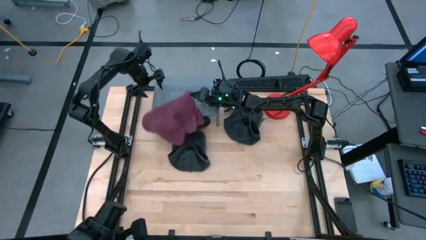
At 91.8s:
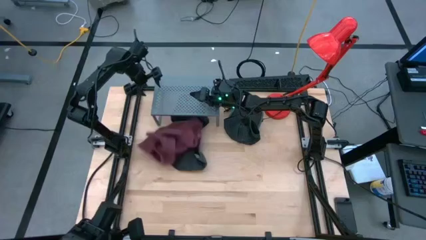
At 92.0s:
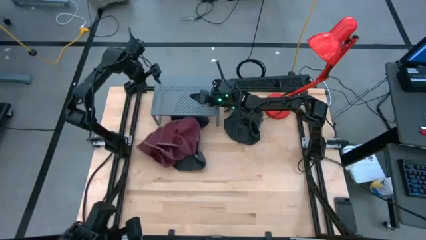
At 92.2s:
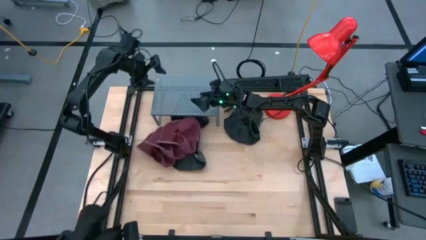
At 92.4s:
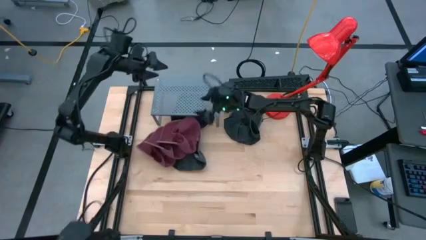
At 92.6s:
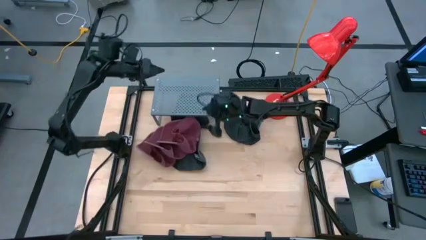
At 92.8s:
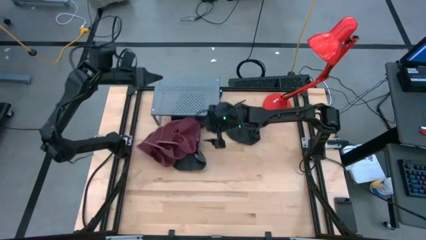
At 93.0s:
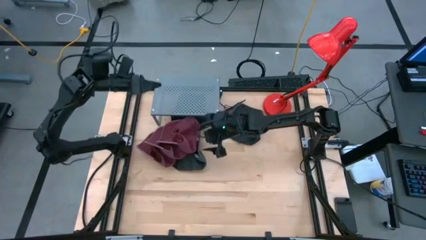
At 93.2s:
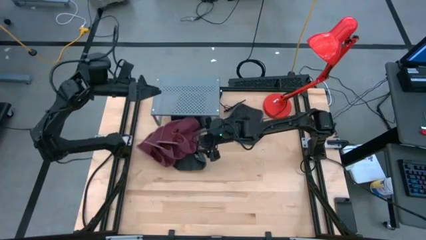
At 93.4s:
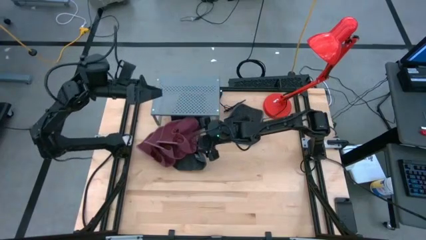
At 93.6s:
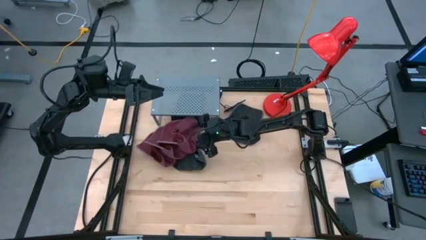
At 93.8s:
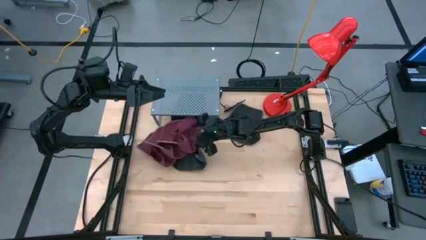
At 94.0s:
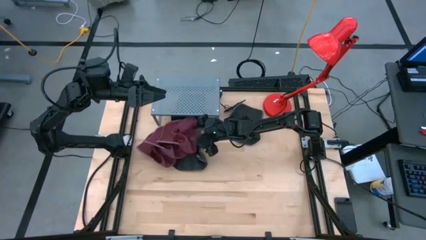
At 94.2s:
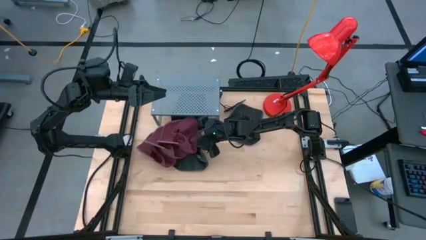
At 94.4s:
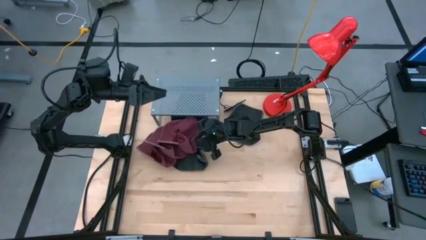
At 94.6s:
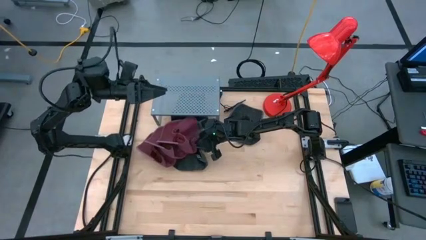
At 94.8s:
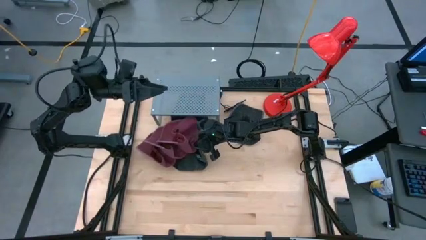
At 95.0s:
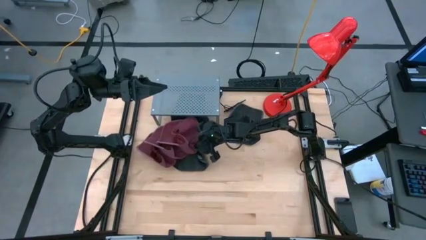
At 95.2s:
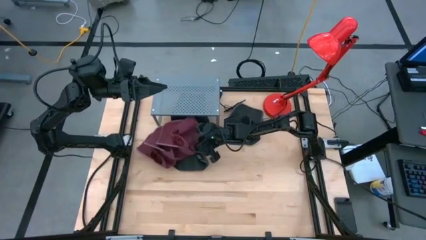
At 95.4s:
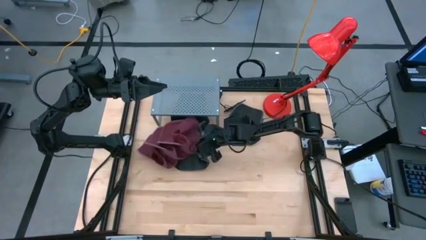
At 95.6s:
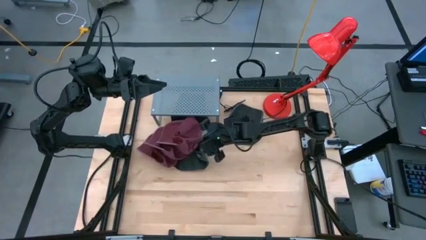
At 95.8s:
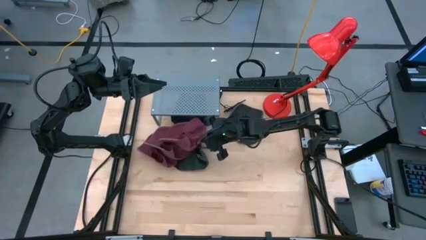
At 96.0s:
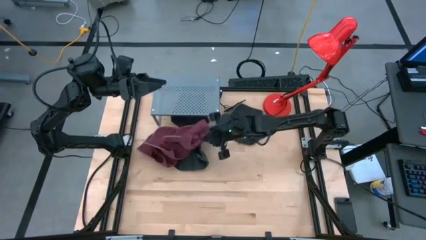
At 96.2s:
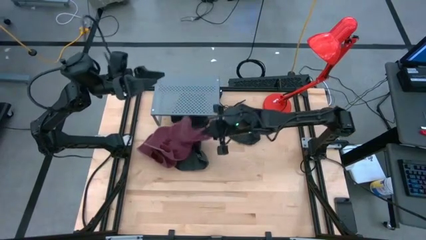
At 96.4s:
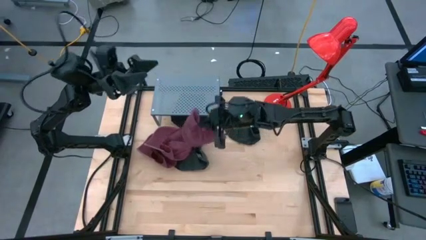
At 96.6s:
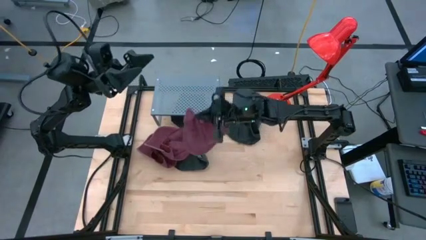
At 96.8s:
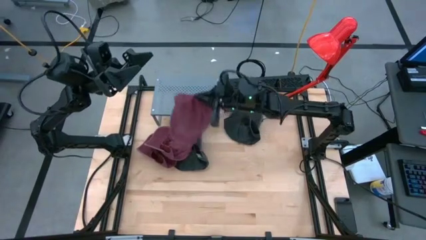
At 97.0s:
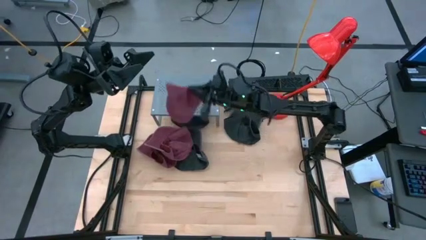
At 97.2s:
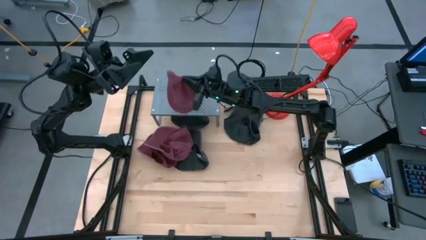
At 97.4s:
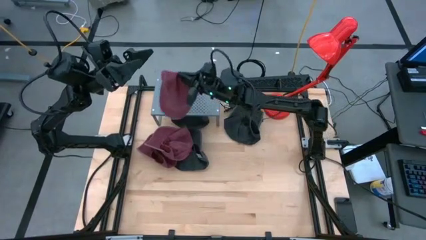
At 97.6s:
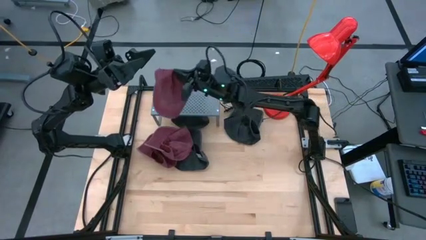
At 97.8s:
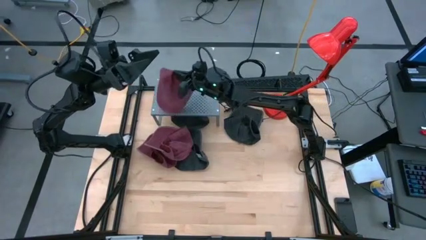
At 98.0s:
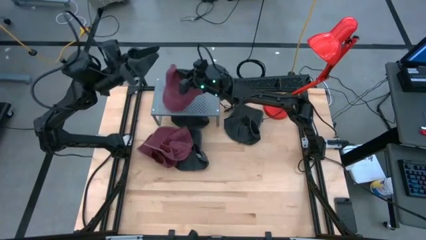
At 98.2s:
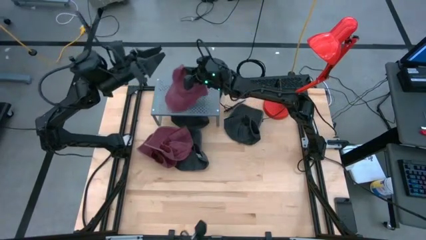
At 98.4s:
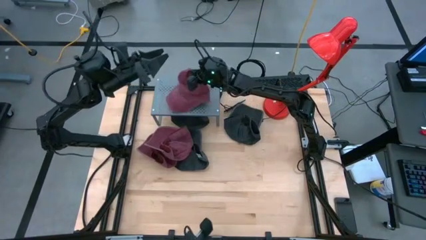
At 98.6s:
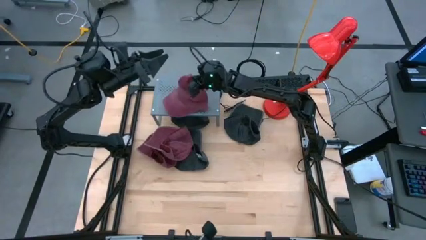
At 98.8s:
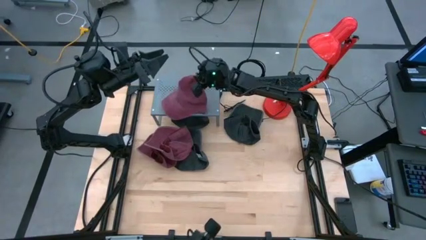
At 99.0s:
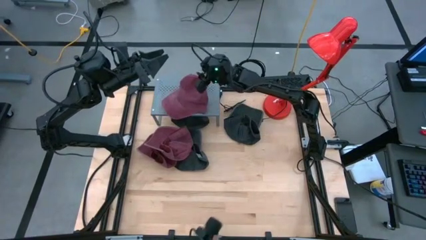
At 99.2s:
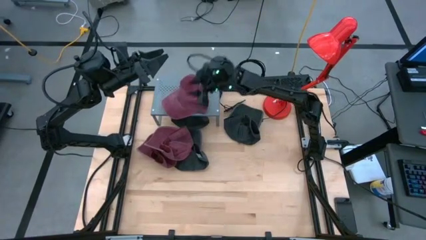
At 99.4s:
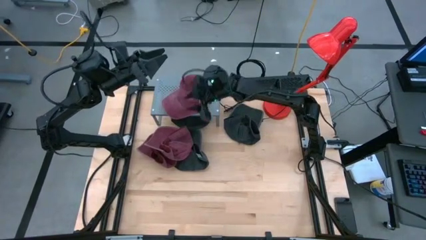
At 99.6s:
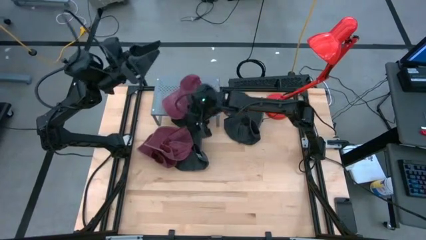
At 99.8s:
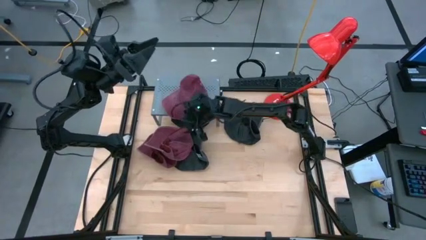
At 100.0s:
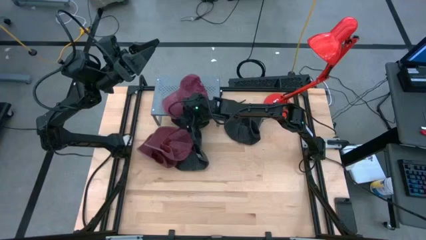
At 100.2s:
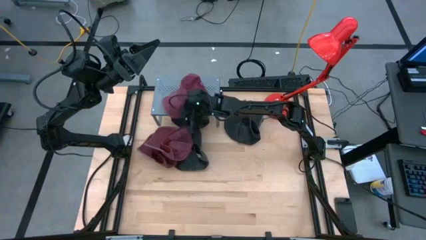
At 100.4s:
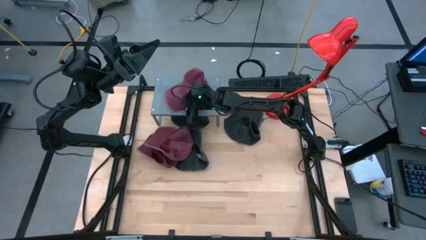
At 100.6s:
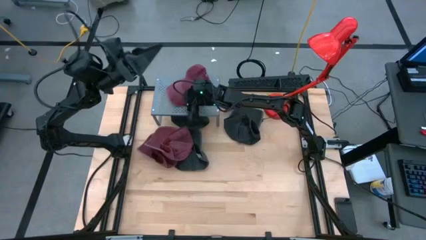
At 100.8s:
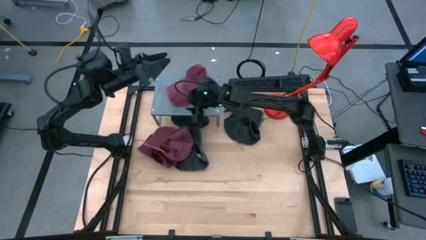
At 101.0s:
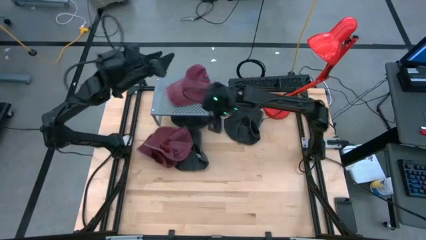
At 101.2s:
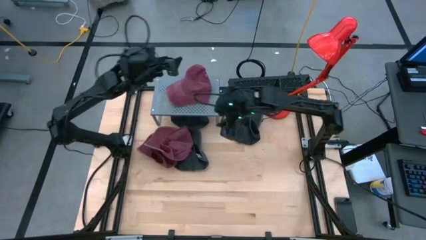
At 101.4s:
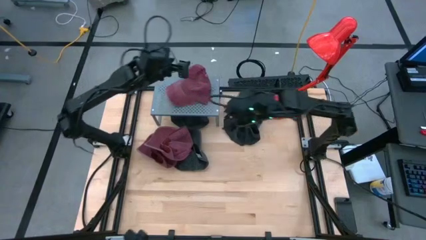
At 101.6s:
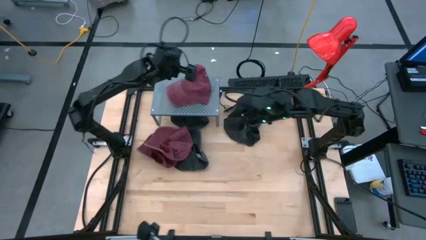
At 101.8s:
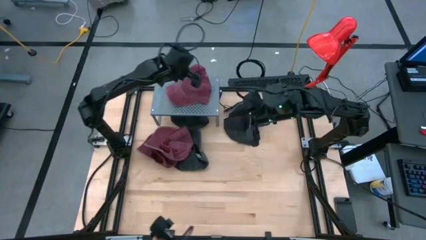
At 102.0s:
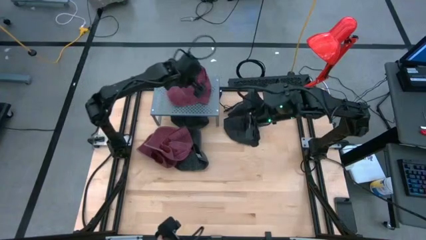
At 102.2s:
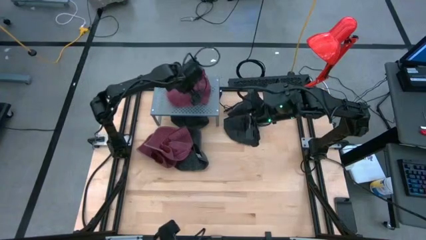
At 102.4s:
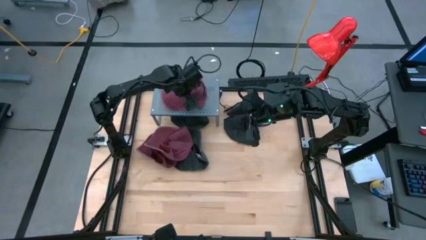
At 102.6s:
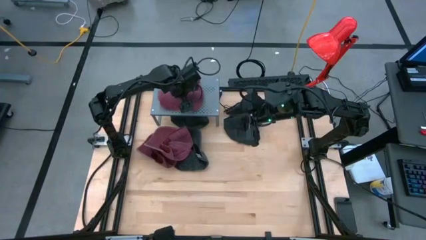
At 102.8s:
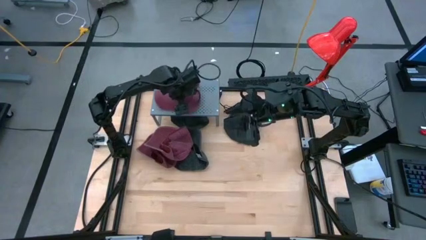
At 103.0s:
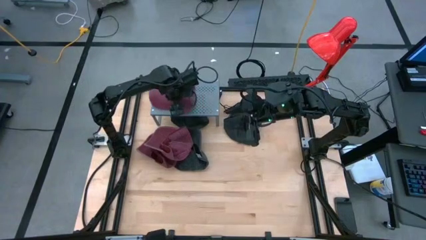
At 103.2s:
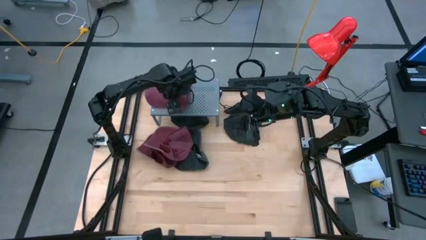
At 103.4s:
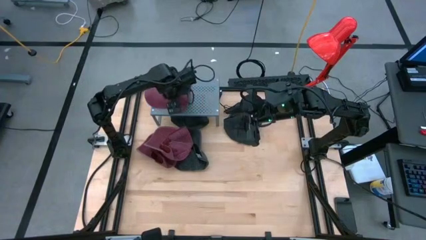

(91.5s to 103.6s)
Task: Pick & Place hat
Put the right red cap on the shelf

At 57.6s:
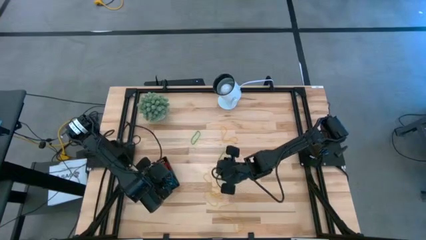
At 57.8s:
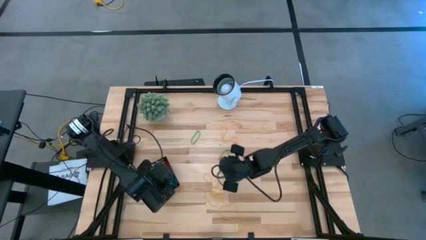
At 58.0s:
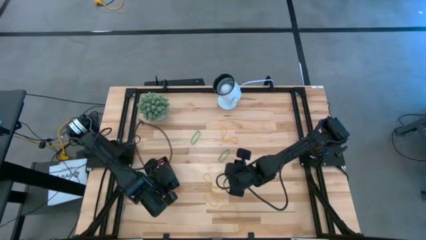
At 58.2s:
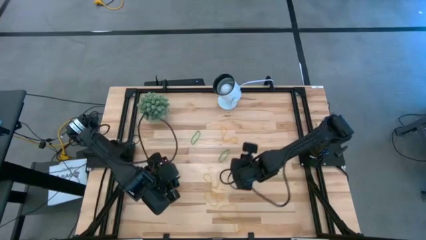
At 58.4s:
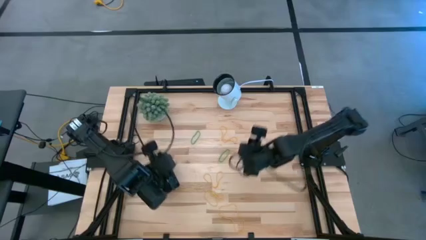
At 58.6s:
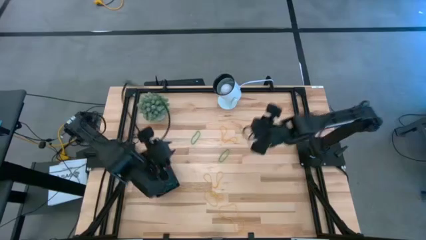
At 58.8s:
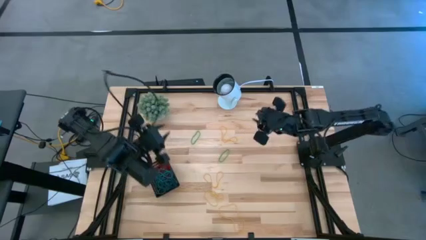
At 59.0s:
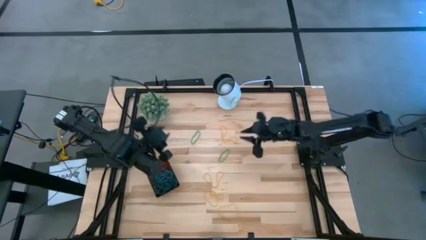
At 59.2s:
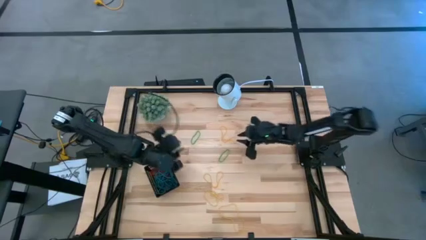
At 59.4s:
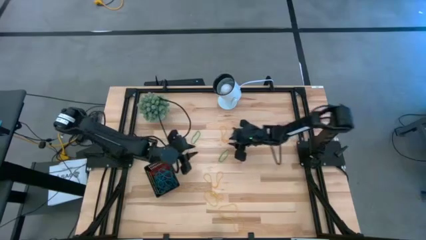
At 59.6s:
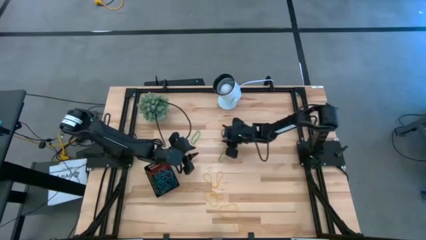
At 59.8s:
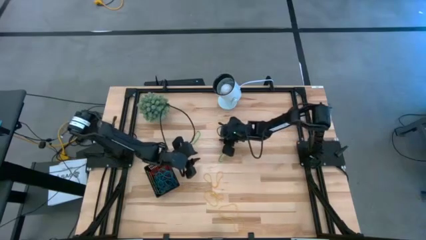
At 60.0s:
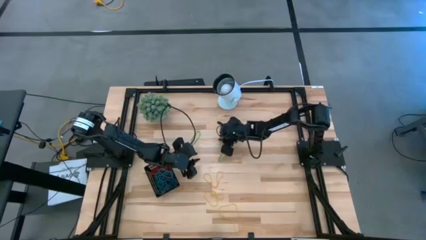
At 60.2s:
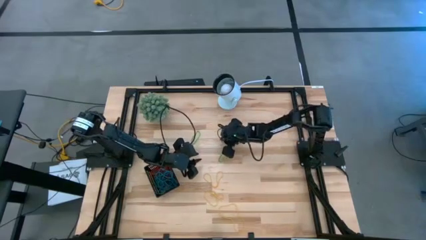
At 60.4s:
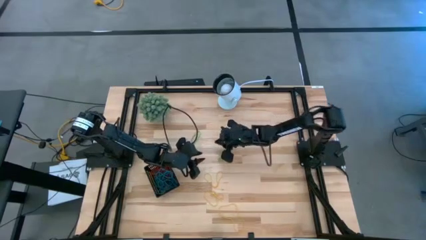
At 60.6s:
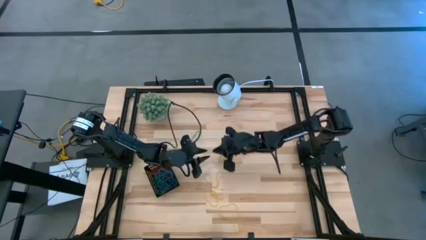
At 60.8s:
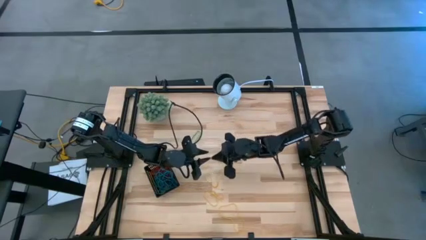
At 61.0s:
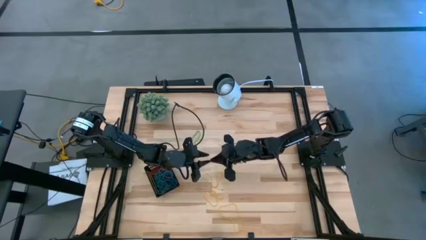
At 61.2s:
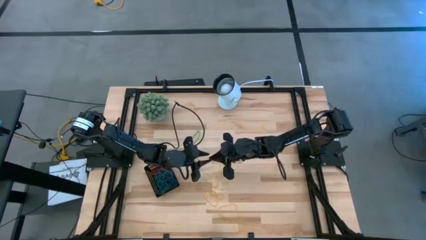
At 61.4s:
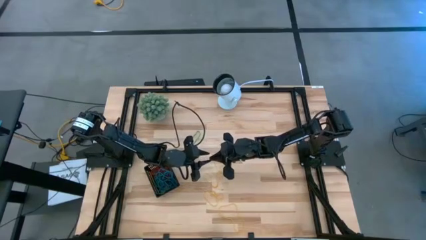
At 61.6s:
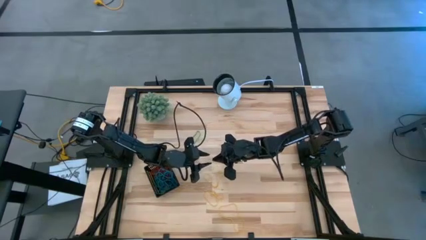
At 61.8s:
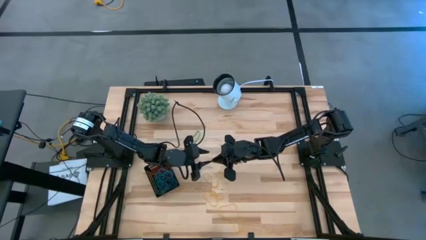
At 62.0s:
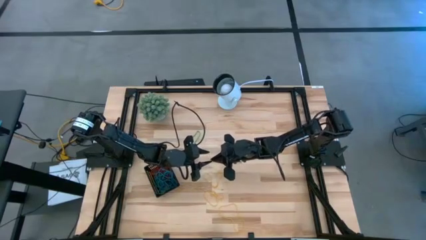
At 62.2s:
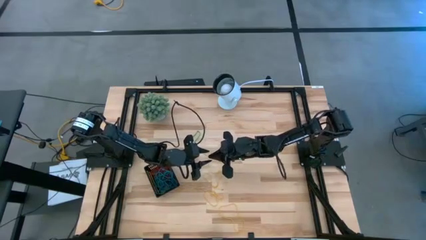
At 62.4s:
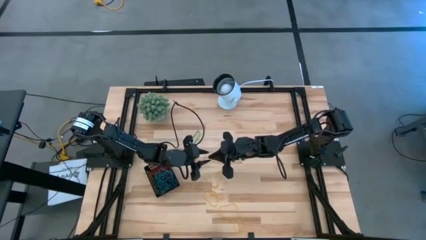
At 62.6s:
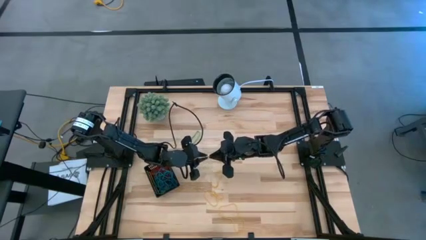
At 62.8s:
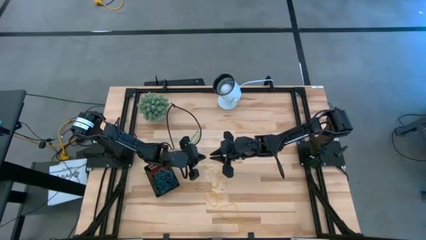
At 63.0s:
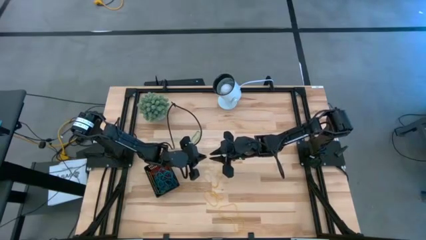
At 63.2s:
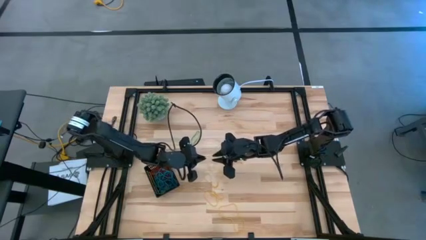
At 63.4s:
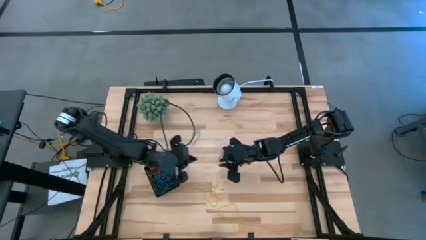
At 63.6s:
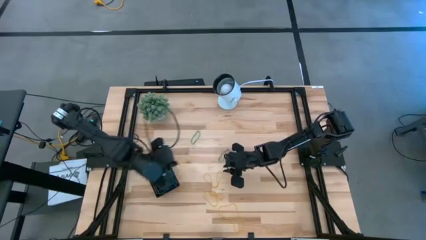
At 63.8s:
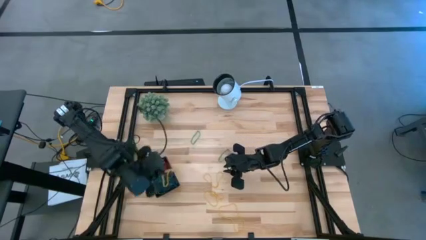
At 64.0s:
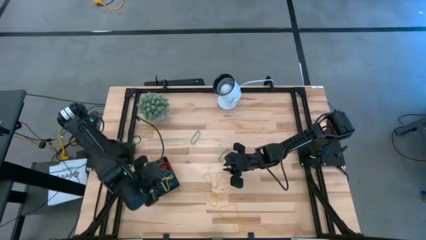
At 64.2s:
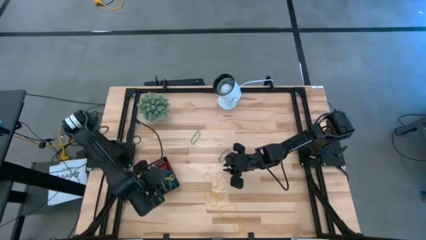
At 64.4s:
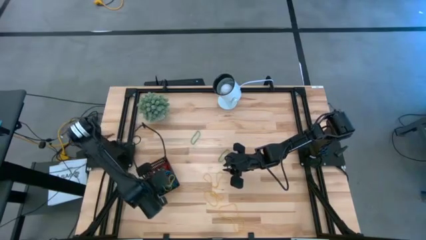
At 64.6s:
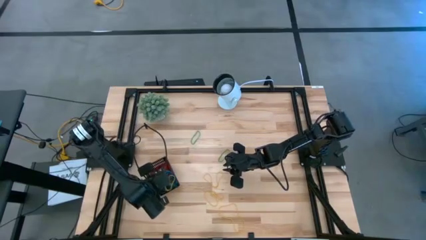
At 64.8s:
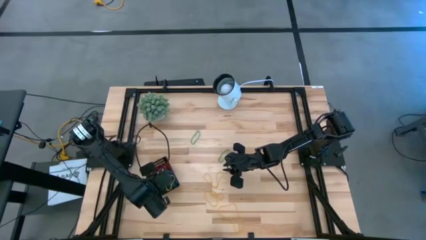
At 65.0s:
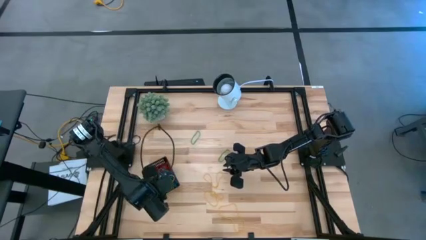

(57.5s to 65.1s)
Task: Pick and place items into bin
Put the yellow rubber band into the black bin
